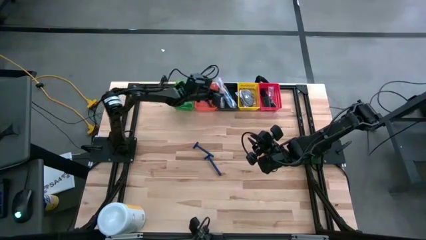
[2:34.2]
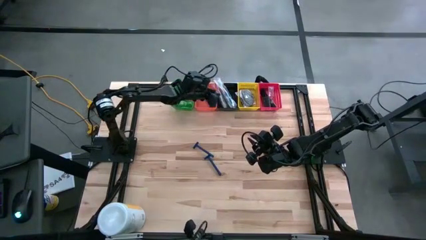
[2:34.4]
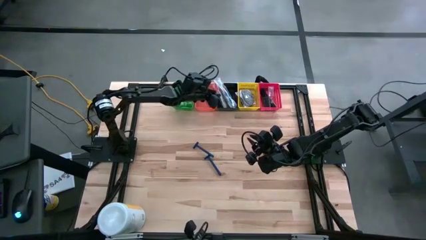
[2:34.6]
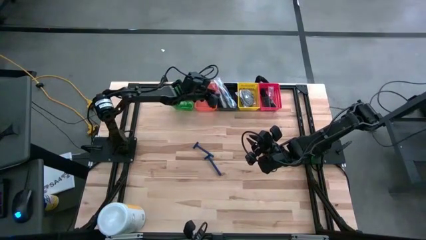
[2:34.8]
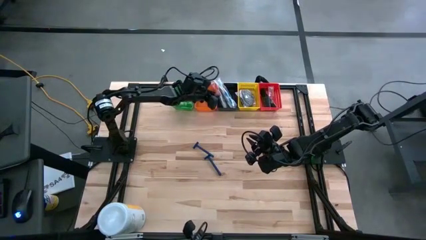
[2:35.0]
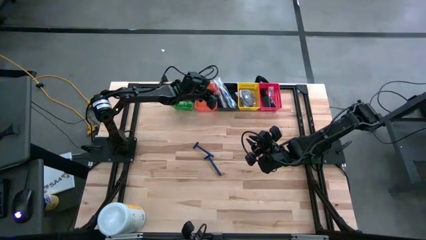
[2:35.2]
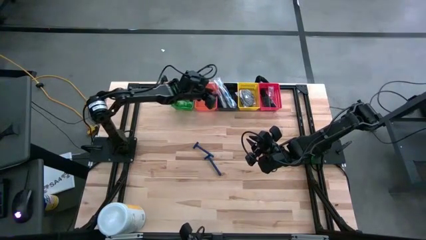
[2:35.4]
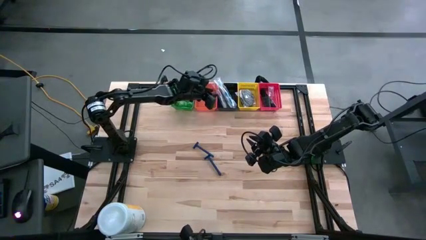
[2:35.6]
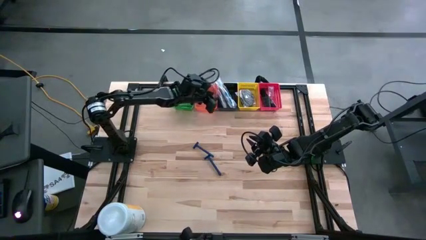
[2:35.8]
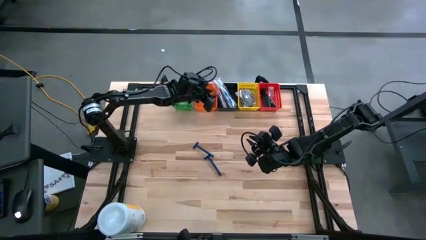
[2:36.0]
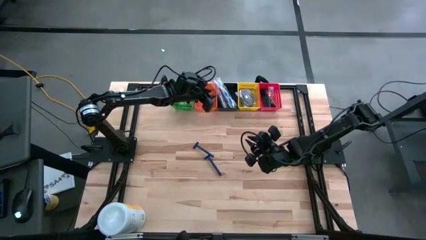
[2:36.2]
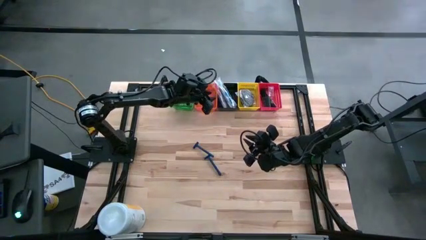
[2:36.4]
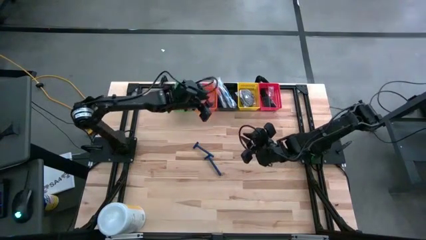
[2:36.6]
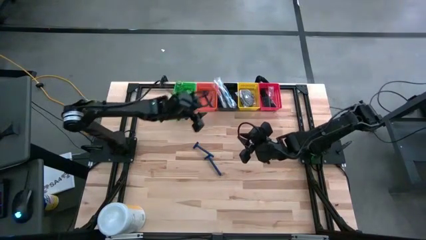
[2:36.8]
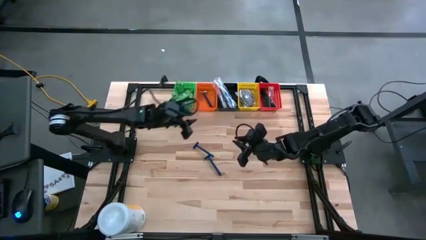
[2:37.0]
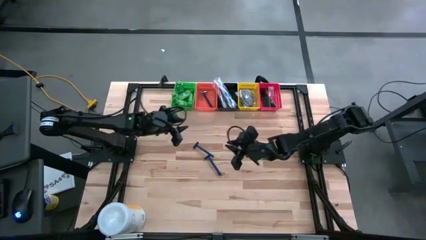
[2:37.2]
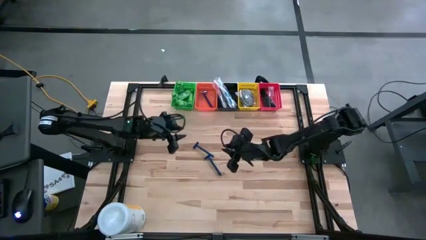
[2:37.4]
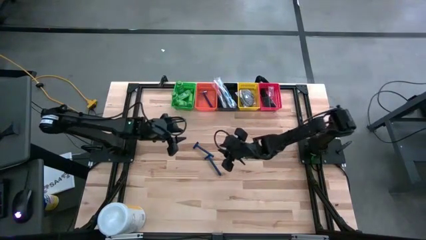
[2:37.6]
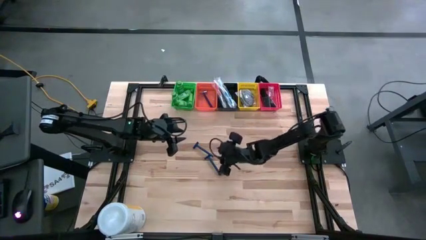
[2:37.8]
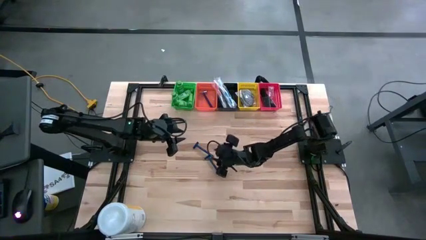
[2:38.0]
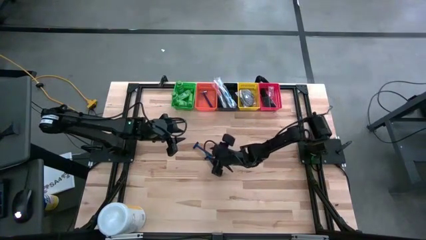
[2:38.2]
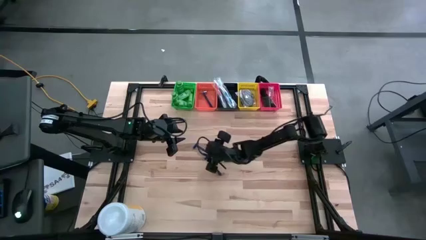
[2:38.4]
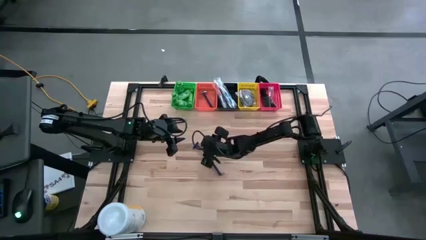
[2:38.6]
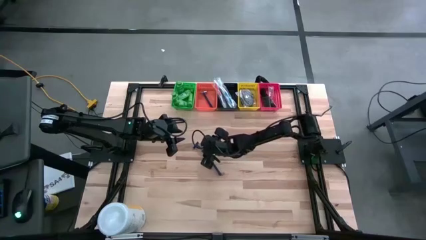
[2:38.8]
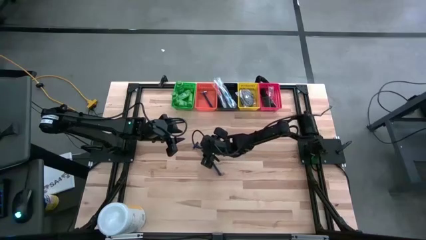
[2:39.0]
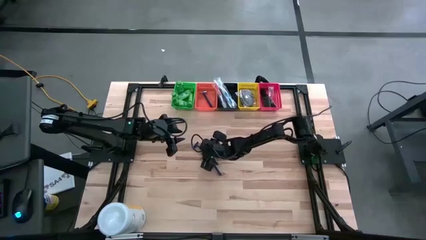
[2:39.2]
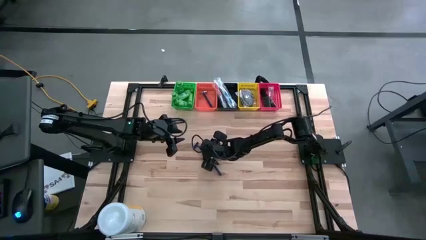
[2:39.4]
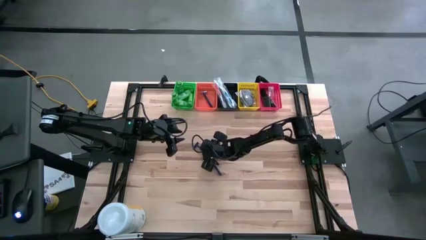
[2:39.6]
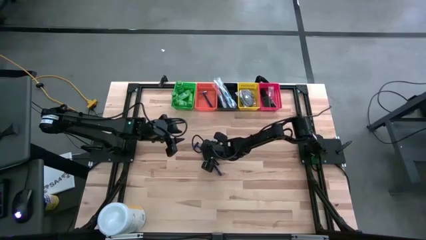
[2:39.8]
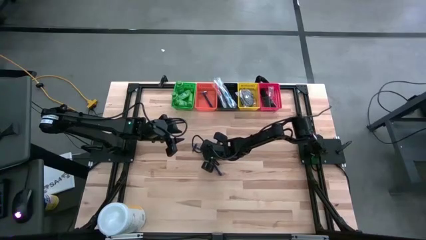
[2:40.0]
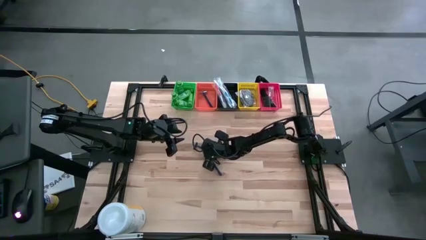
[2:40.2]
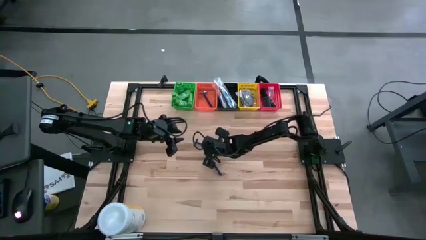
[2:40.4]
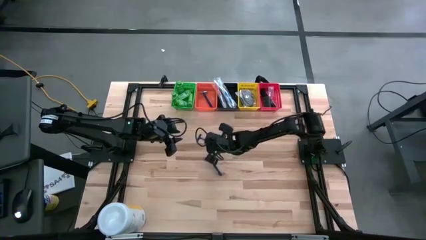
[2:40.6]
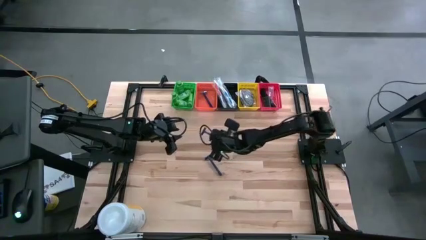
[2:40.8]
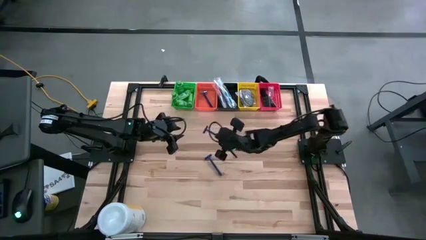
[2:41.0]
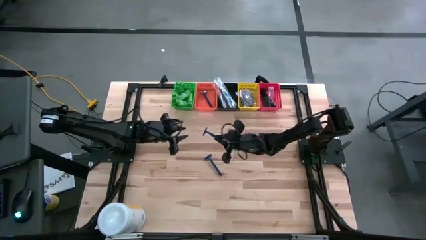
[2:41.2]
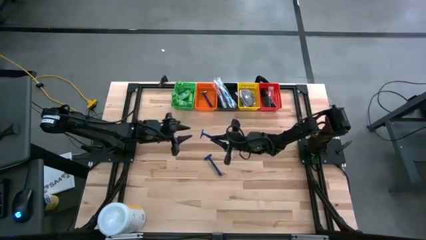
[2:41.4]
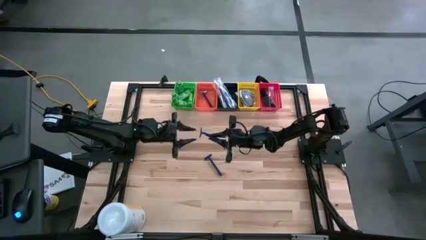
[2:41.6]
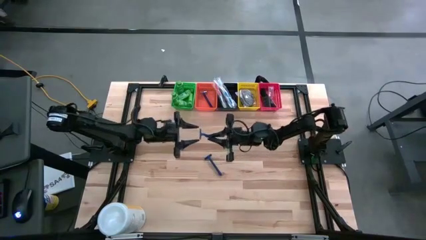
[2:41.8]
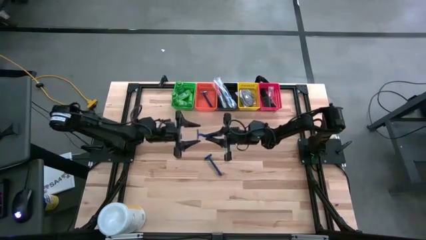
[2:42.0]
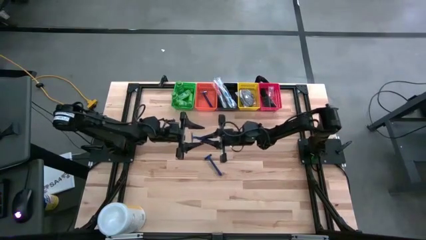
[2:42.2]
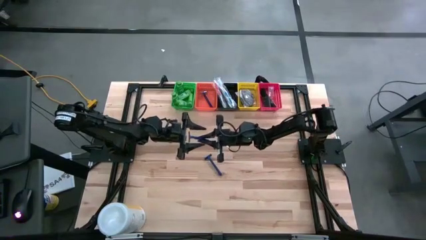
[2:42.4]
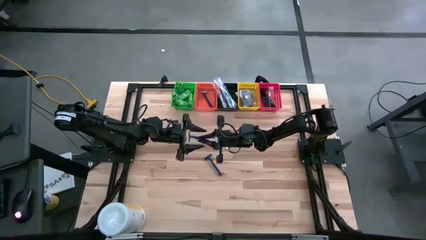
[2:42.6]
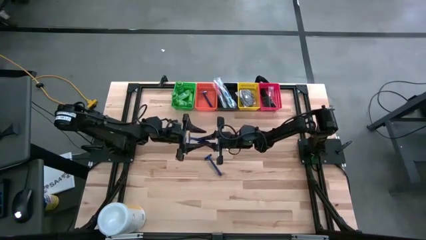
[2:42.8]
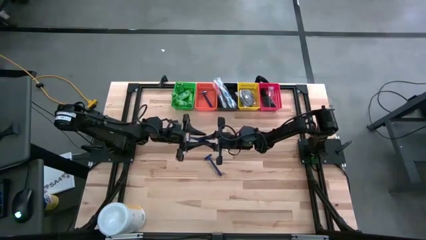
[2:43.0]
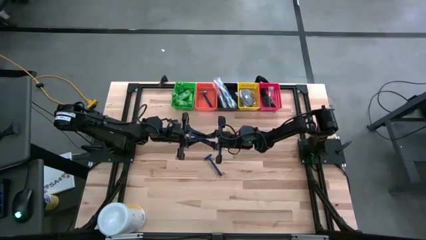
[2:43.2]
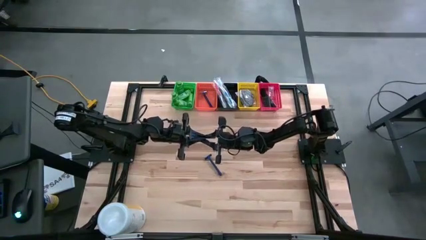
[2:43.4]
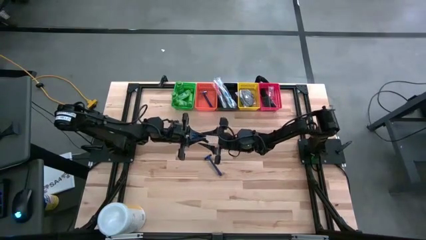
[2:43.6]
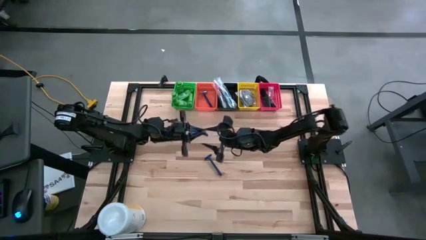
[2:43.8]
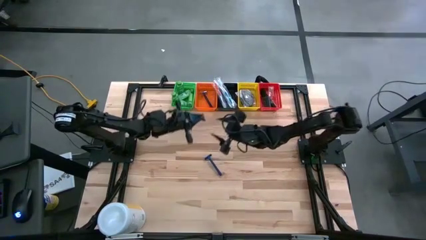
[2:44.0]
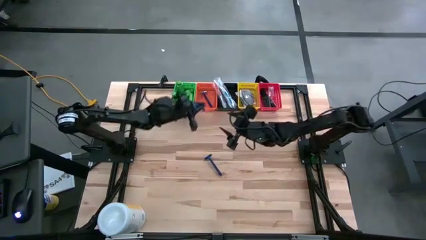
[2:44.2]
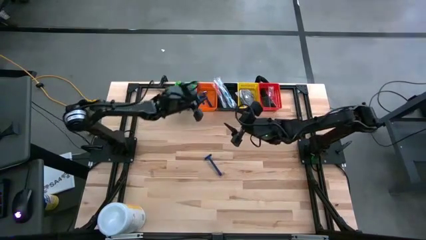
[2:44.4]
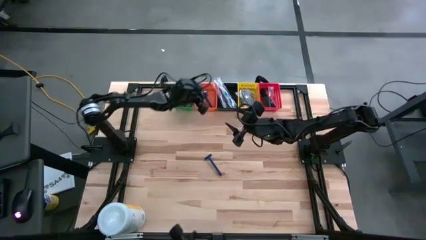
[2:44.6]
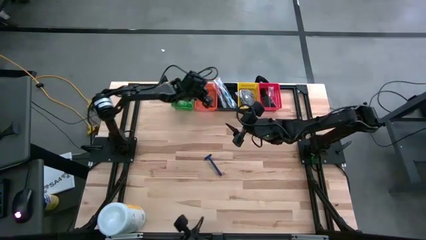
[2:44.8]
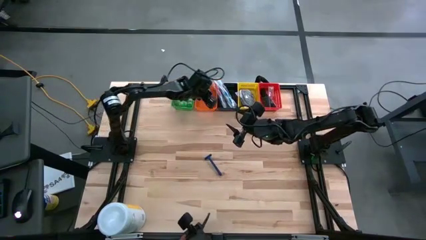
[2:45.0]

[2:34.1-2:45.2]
Task: Pick & Place Travel size toiletries
Put the blue razor into the orange bin

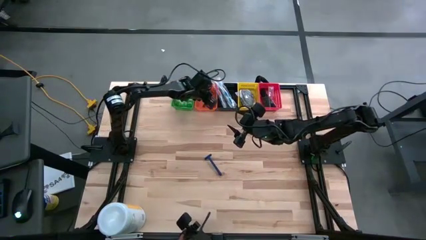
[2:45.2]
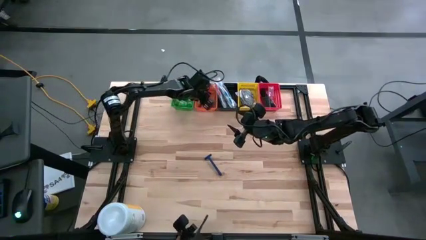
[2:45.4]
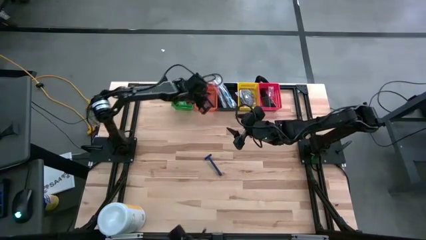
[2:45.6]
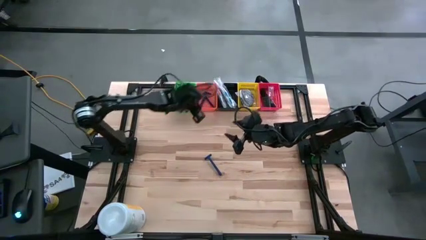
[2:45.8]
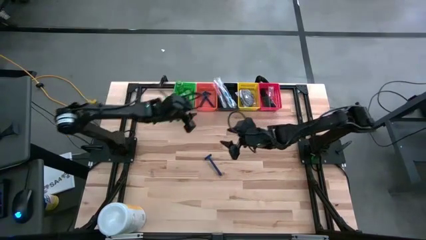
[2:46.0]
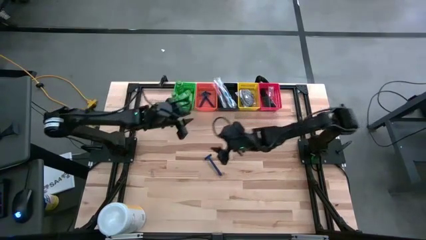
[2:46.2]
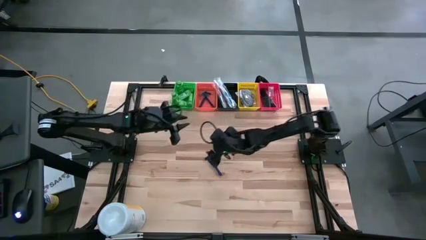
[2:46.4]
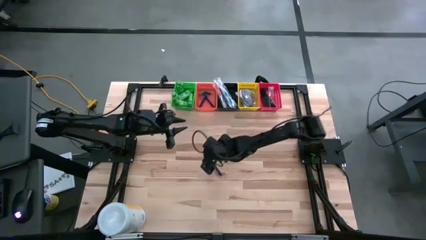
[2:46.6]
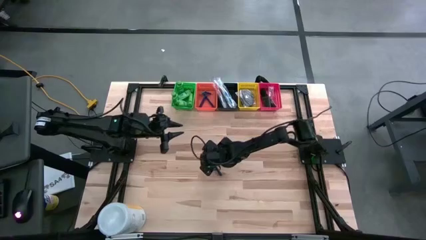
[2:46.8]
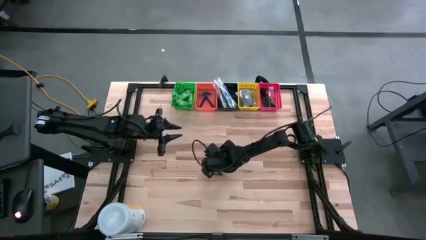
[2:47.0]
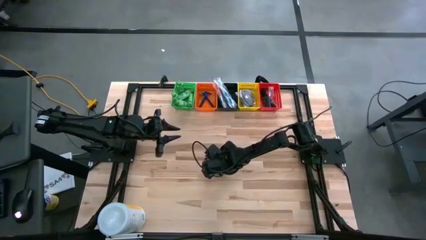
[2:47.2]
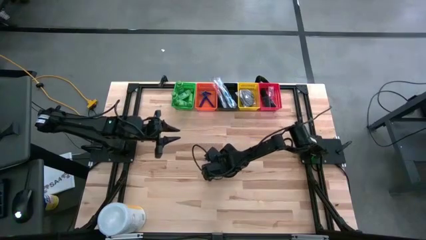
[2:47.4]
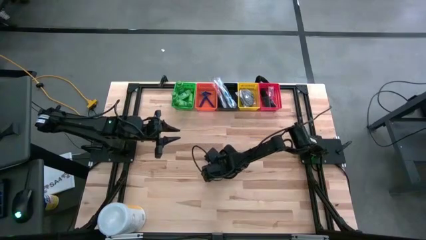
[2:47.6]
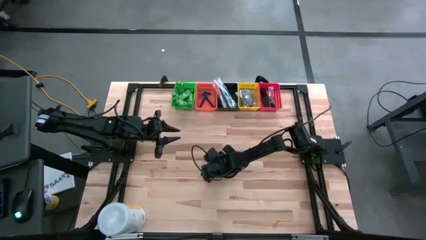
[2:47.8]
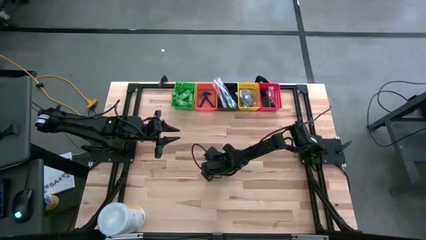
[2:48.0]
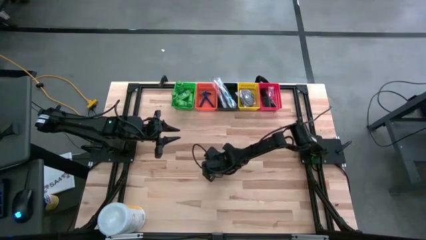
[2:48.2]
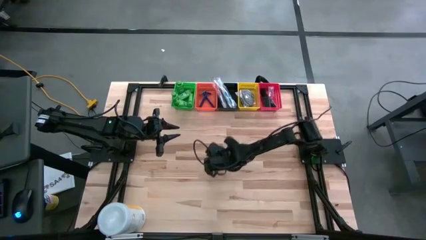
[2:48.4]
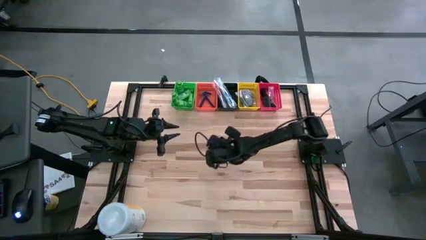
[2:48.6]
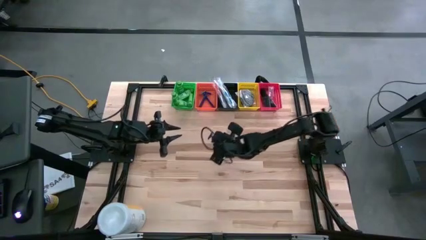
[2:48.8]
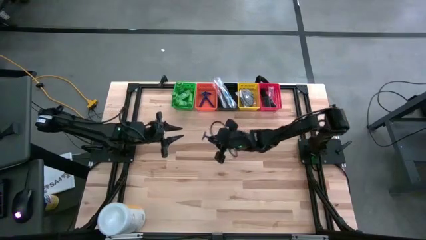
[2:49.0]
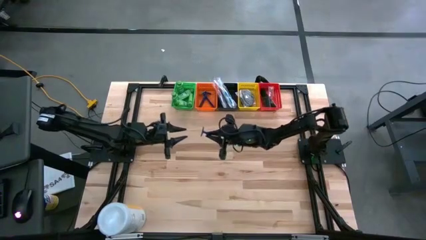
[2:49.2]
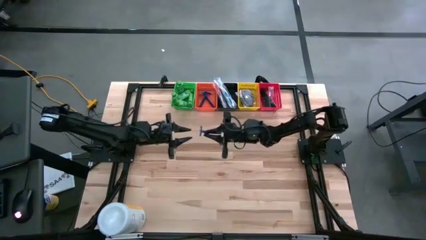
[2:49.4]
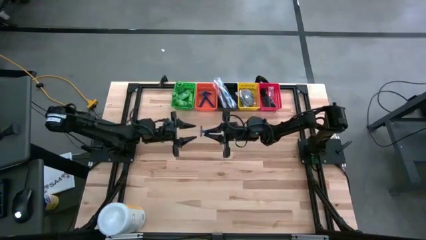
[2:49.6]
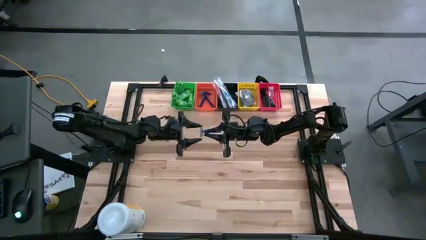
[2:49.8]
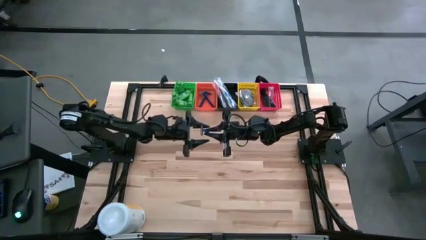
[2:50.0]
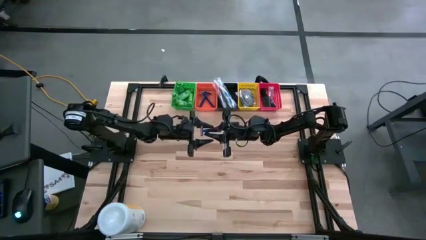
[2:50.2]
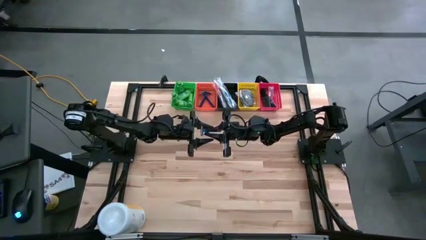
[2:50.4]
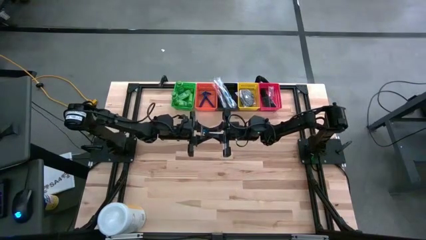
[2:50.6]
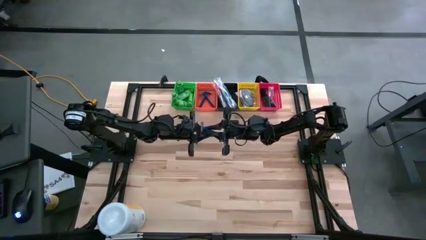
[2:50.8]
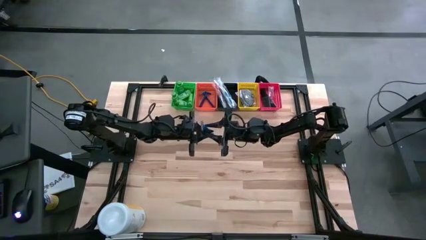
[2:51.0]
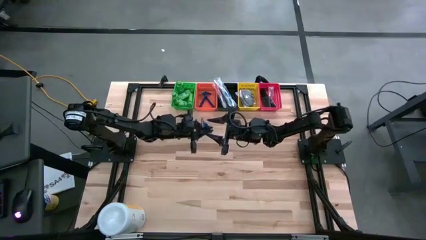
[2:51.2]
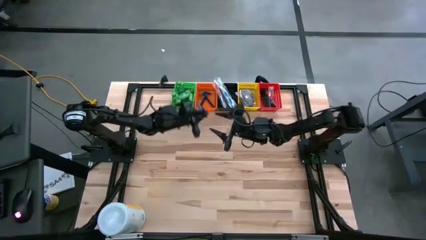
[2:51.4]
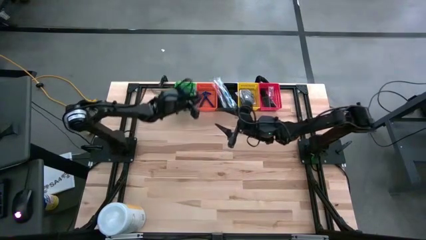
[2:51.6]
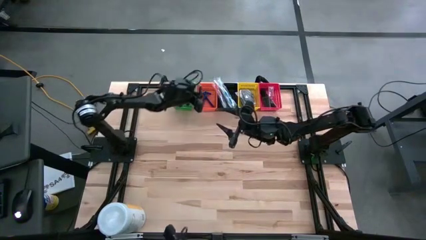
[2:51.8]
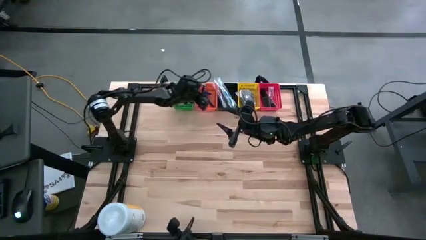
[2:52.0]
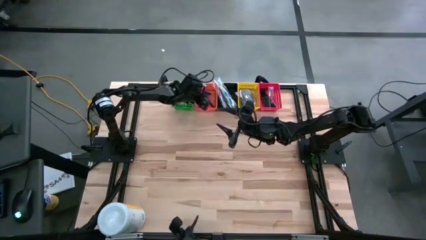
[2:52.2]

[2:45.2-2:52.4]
Put the blue razor into the orange bin
